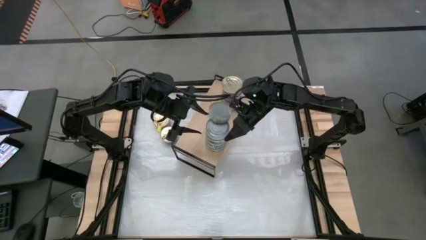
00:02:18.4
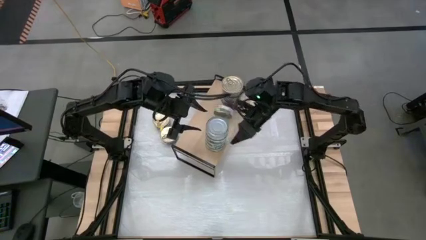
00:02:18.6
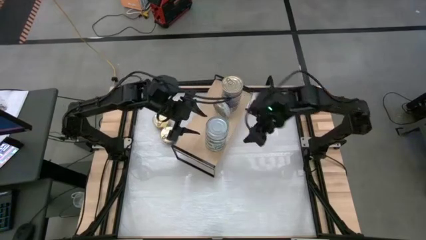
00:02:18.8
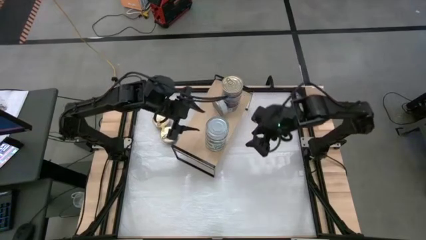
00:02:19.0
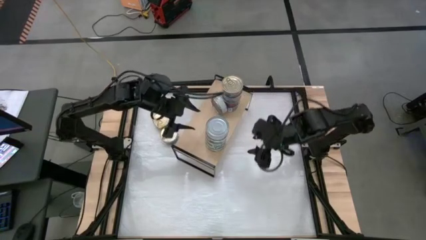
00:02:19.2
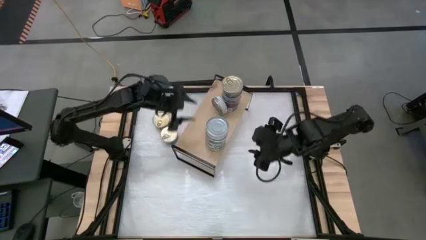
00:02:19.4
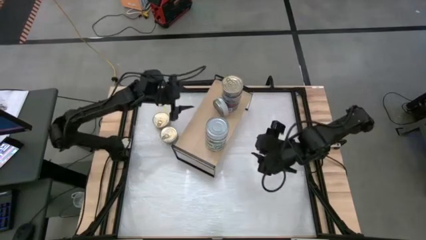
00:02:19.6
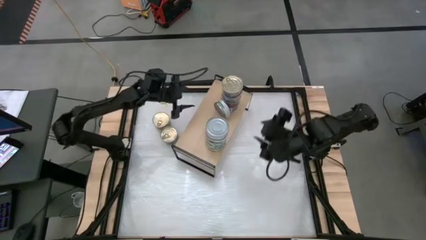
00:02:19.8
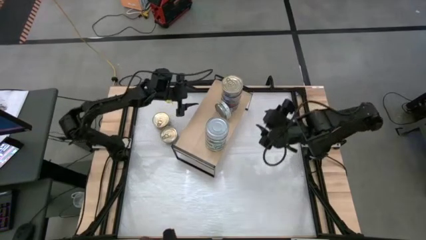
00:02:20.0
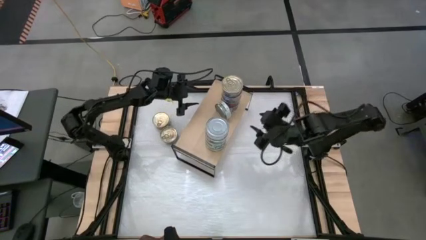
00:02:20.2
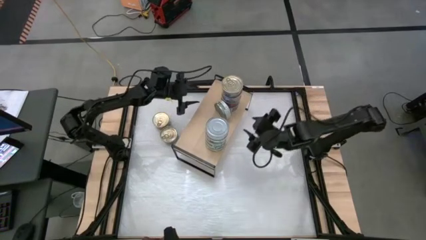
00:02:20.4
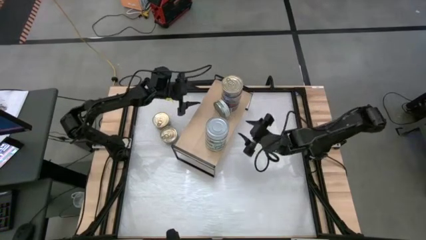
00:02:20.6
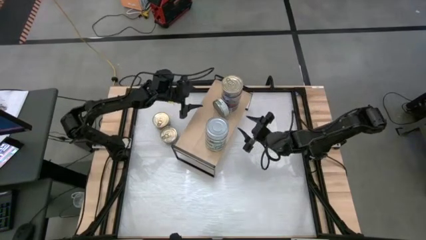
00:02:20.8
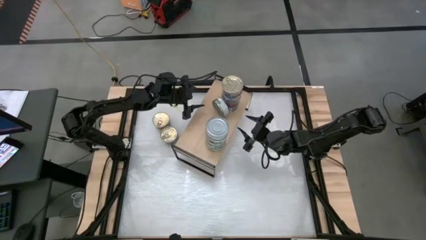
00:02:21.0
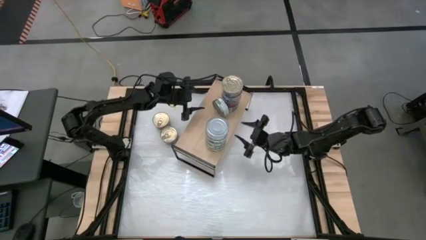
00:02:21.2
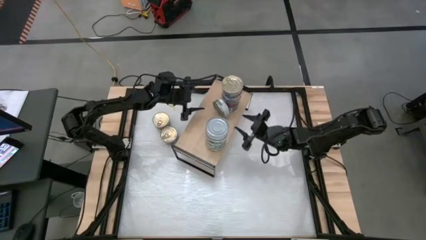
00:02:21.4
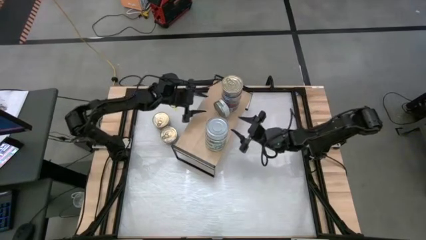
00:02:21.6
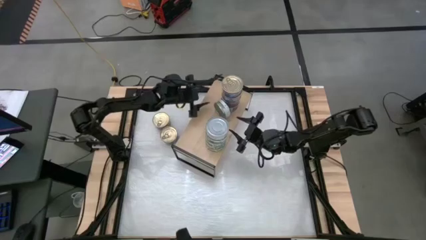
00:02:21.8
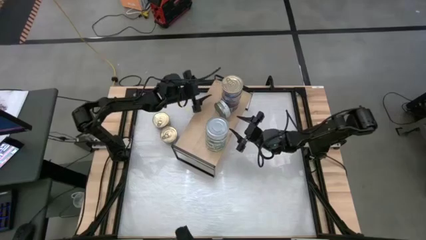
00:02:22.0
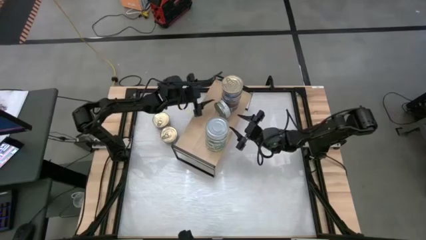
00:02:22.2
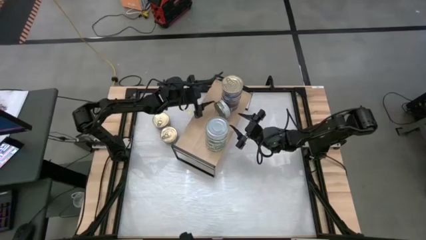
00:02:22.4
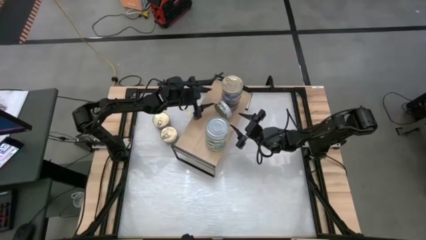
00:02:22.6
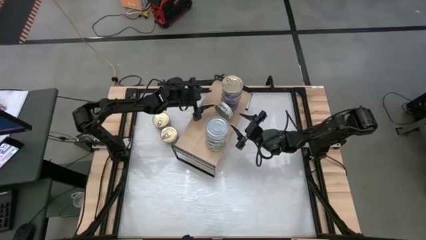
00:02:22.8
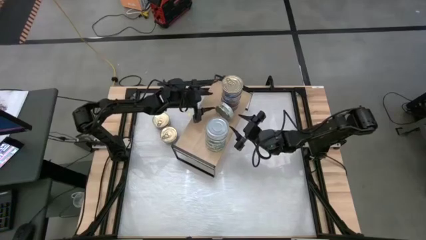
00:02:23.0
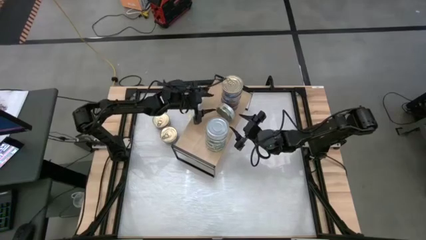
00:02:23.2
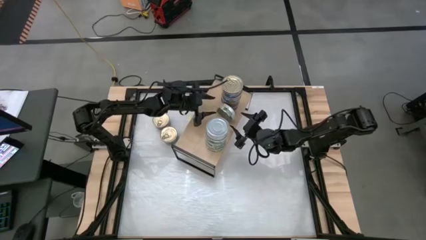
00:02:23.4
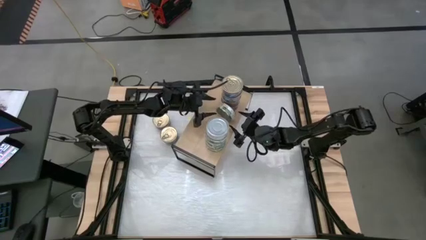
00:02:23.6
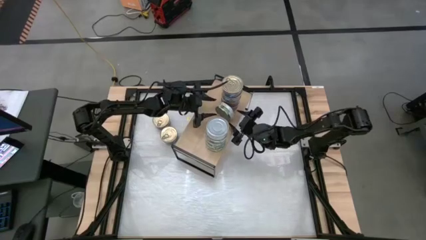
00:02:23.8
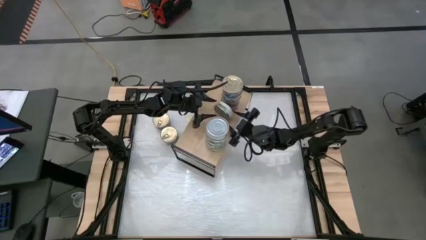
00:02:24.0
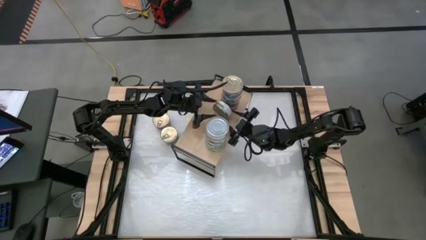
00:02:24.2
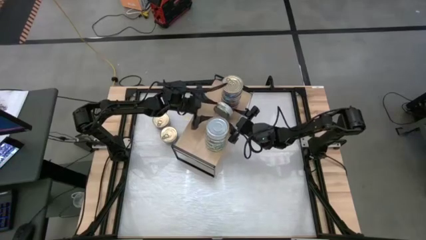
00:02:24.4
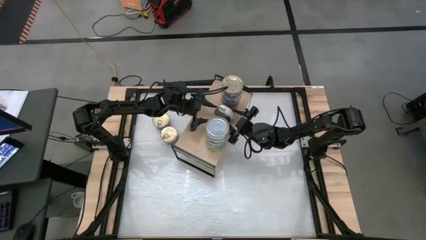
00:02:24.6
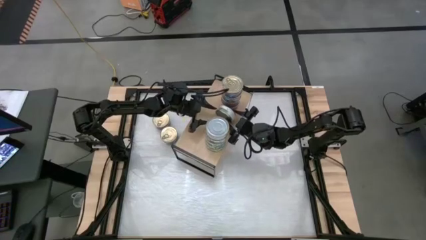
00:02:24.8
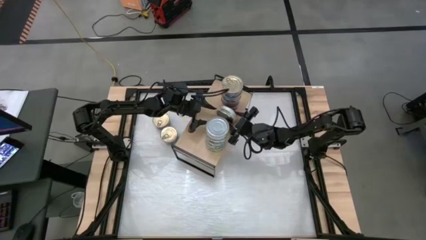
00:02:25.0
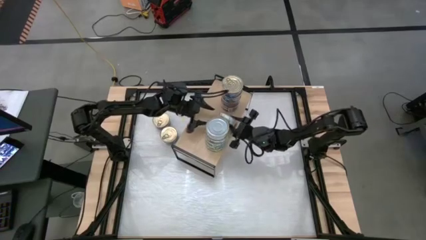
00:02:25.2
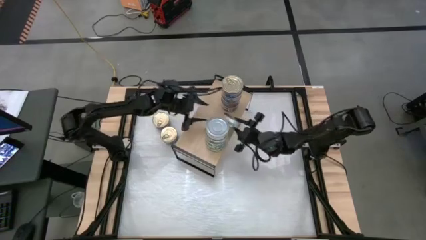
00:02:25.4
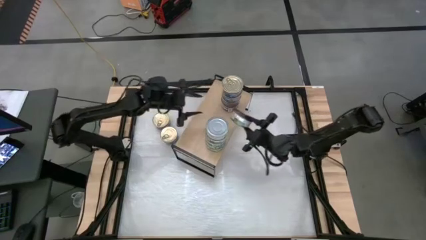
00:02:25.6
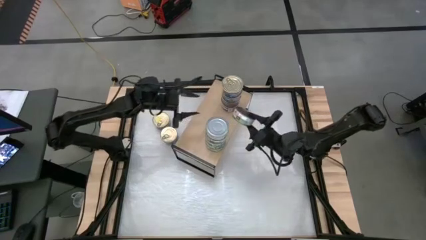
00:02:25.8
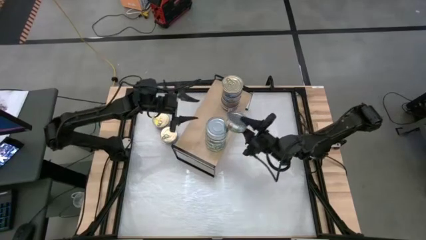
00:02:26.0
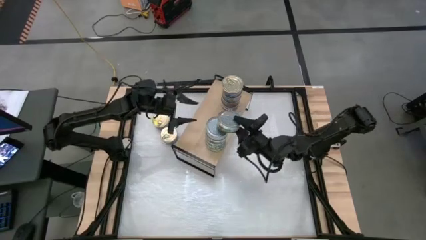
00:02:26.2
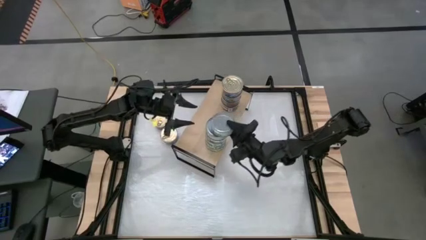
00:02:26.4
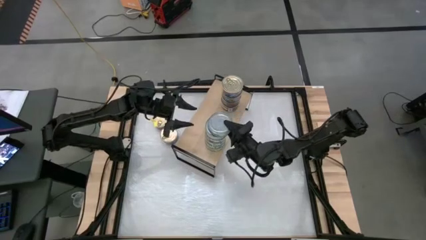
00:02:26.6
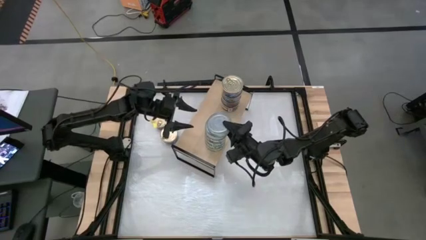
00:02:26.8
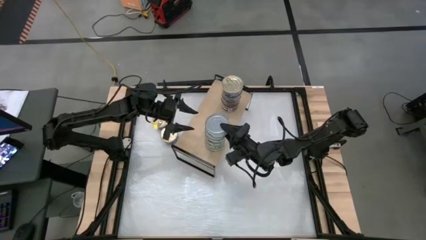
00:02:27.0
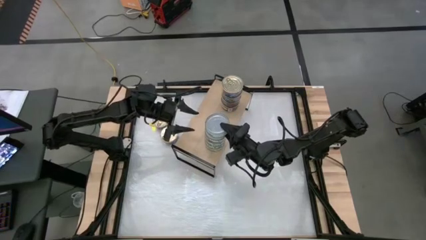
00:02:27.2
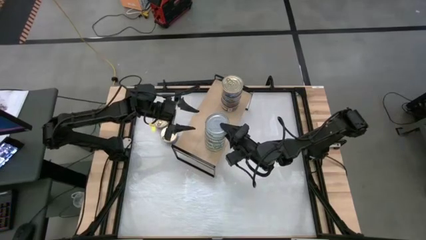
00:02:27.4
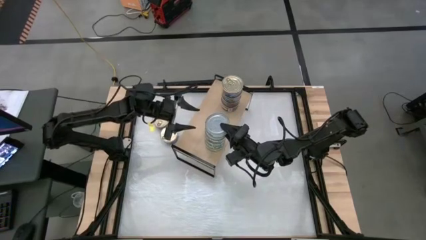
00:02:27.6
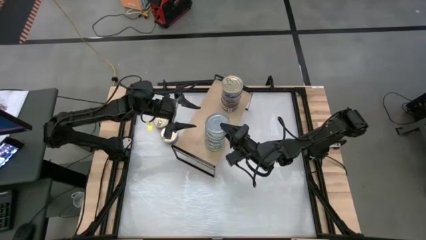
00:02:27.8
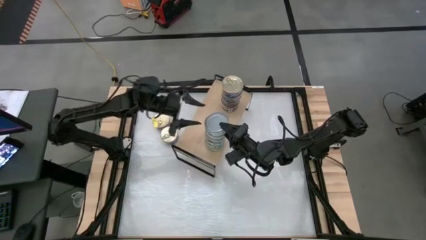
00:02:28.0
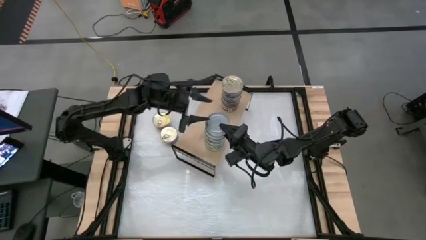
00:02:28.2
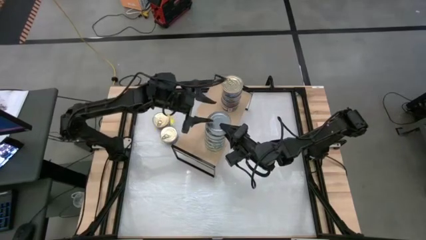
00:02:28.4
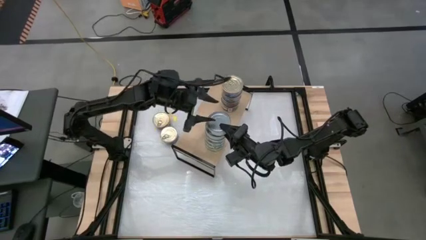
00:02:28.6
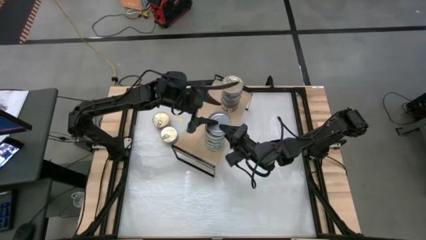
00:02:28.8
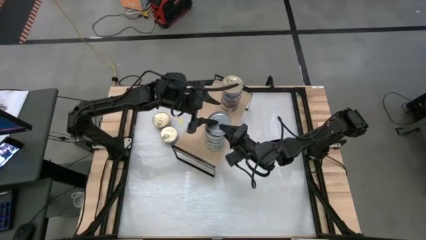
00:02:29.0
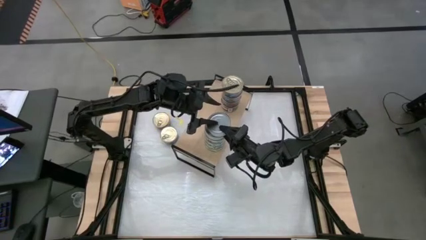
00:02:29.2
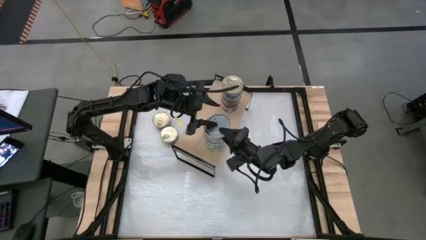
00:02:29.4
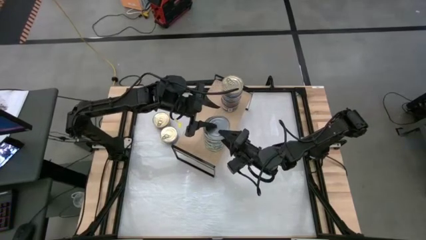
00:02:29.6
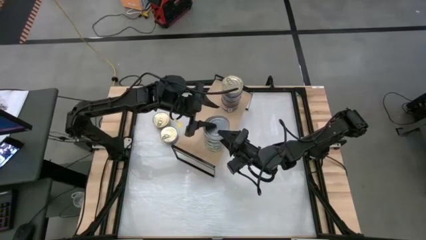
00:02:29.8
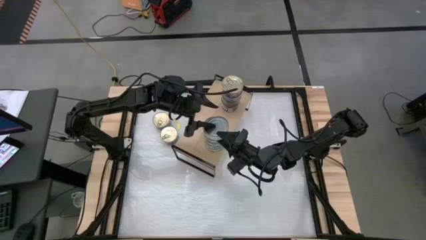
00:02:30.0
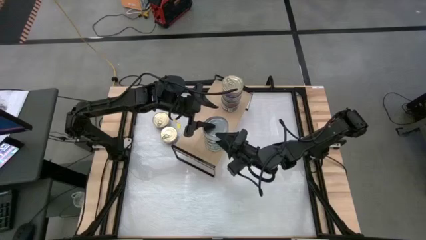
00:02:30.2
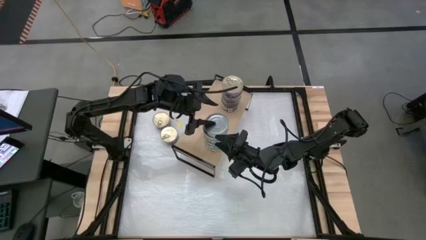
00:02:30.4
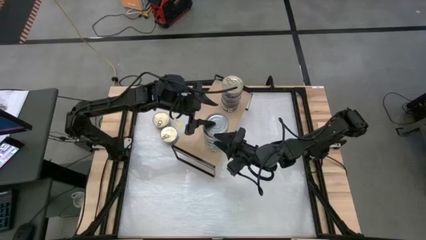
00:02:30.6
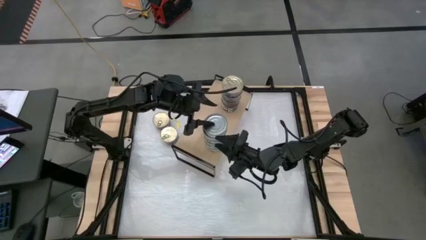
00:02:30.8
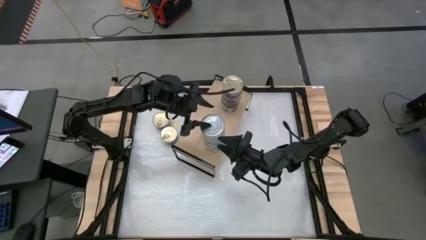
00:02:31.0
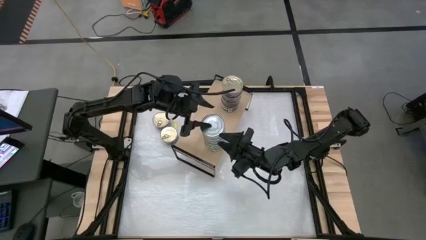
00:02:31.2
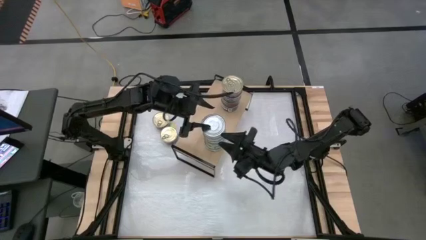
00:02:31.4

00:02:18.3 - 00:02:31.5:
Task: Stack canned seafood by type on shelf
Stack the green tuna can on top of the other green tuna can
